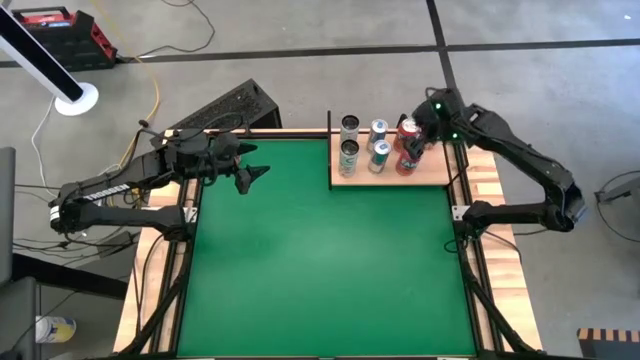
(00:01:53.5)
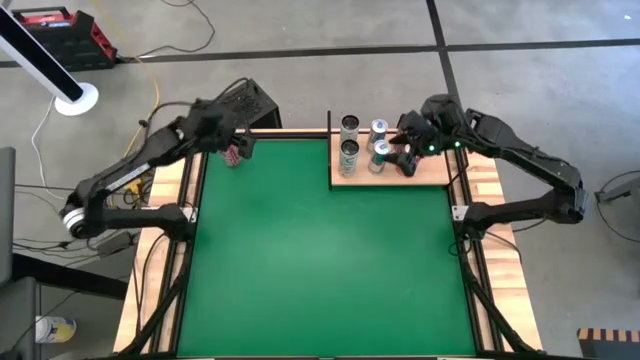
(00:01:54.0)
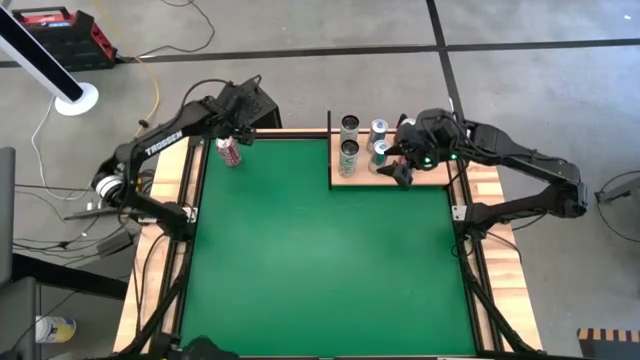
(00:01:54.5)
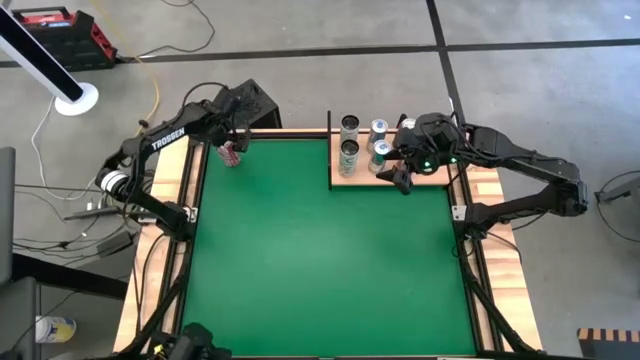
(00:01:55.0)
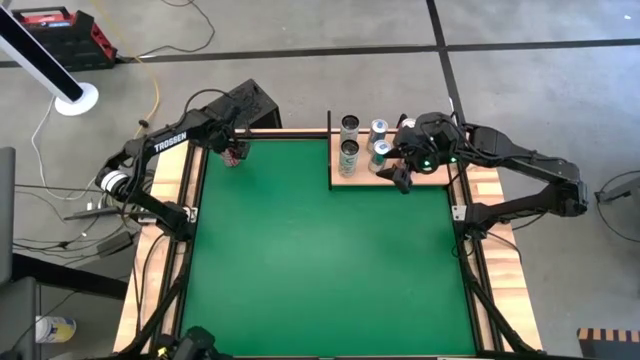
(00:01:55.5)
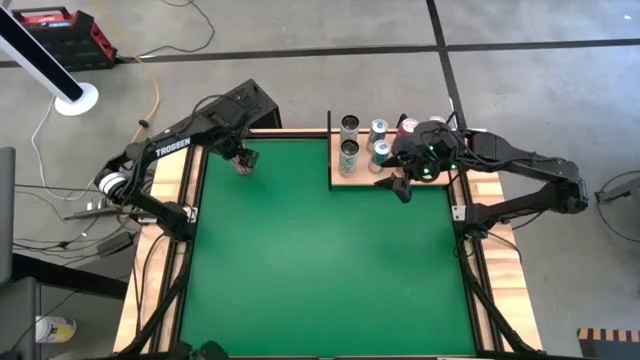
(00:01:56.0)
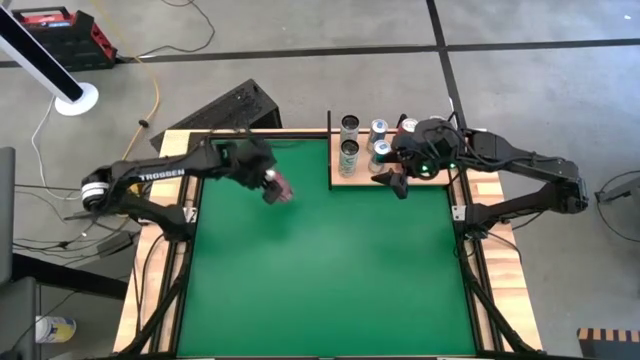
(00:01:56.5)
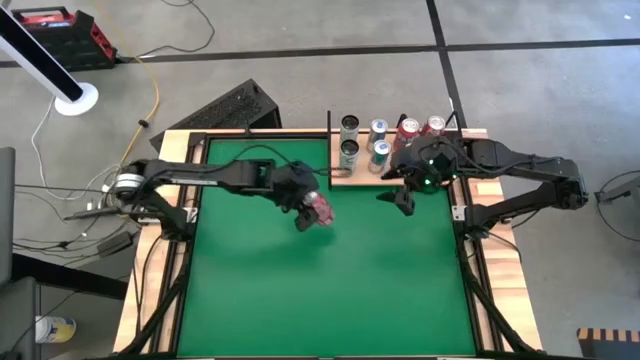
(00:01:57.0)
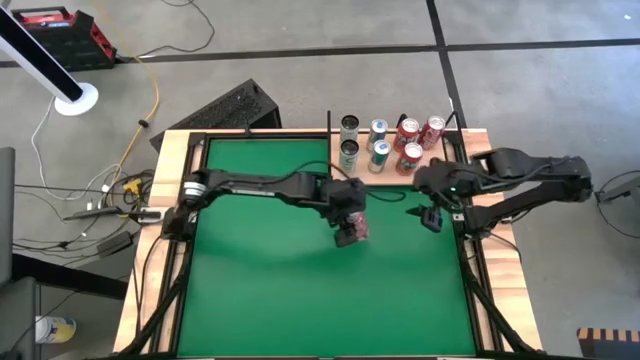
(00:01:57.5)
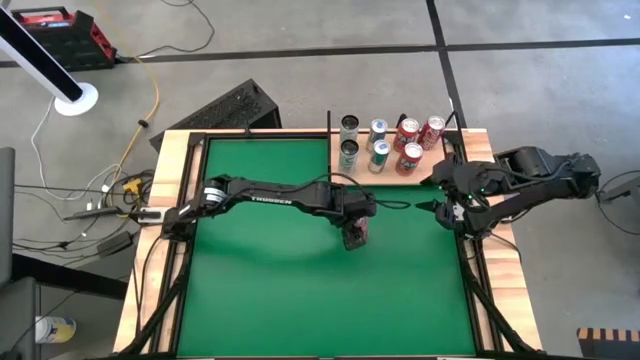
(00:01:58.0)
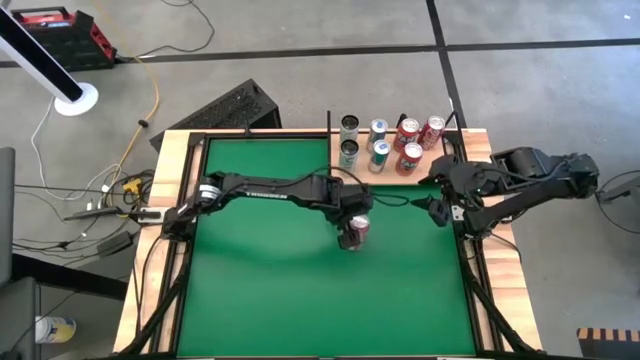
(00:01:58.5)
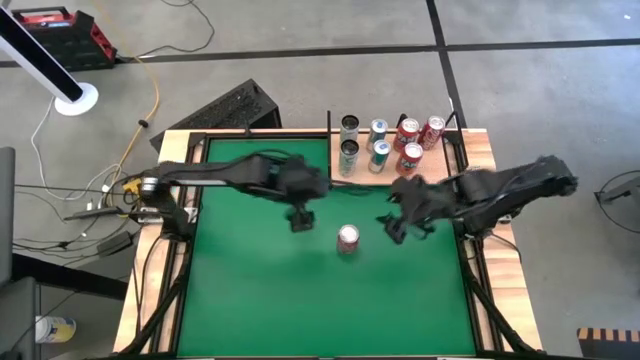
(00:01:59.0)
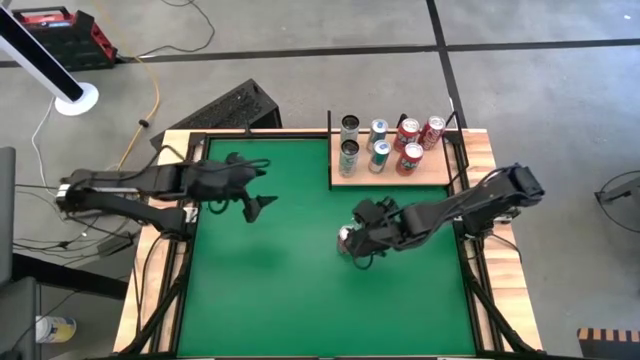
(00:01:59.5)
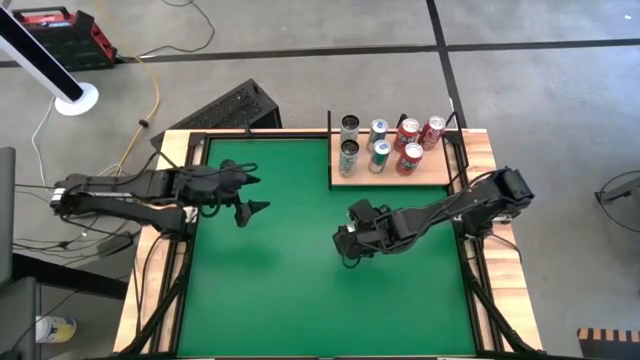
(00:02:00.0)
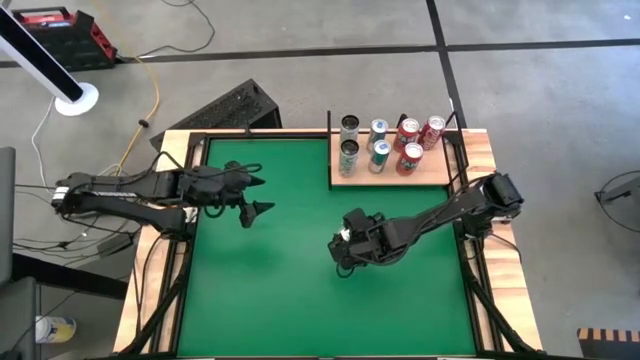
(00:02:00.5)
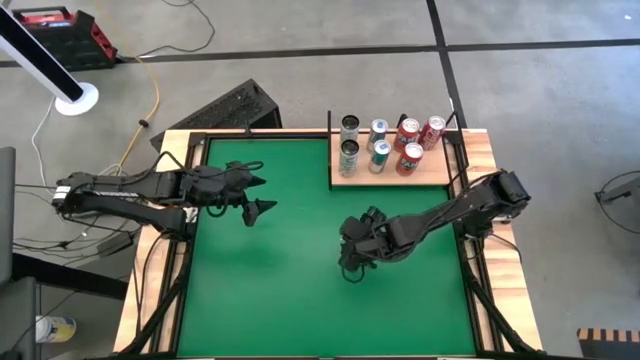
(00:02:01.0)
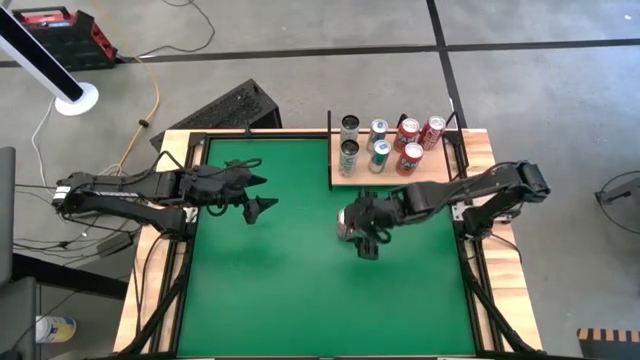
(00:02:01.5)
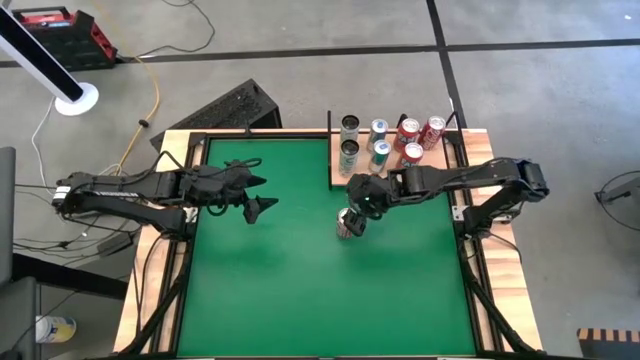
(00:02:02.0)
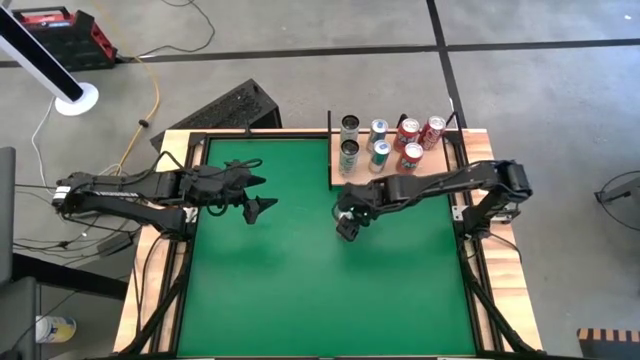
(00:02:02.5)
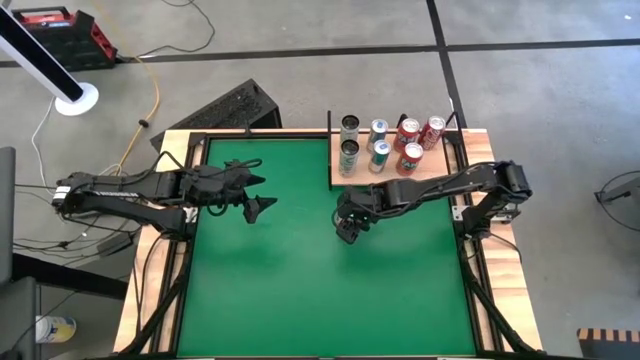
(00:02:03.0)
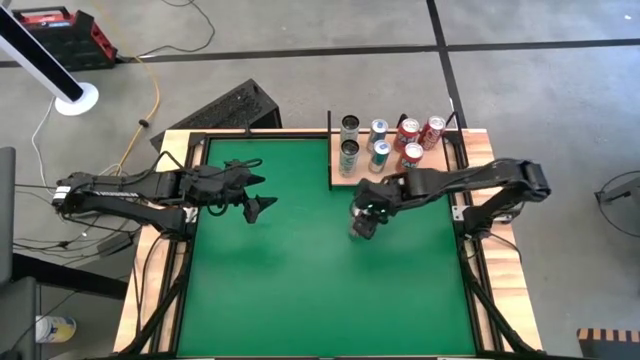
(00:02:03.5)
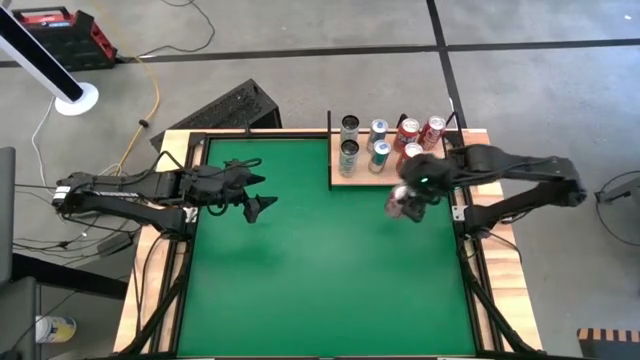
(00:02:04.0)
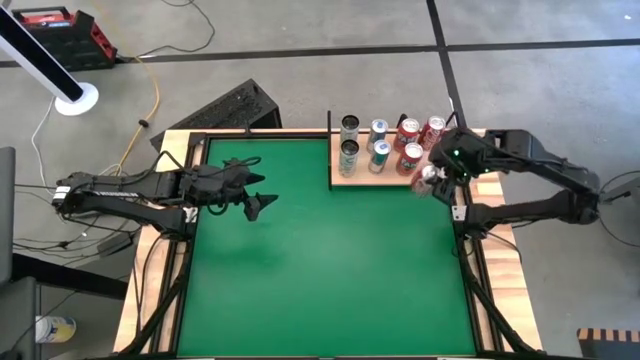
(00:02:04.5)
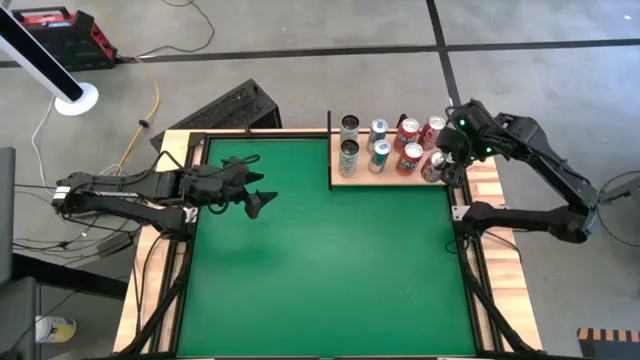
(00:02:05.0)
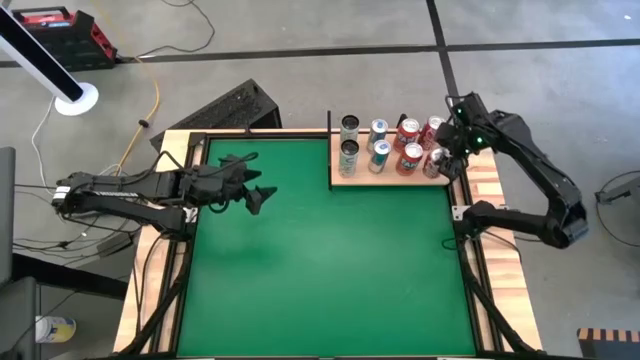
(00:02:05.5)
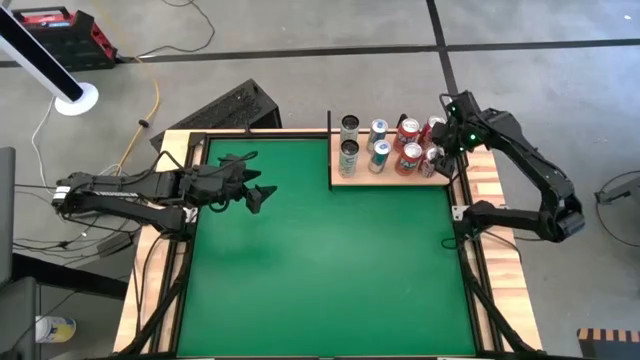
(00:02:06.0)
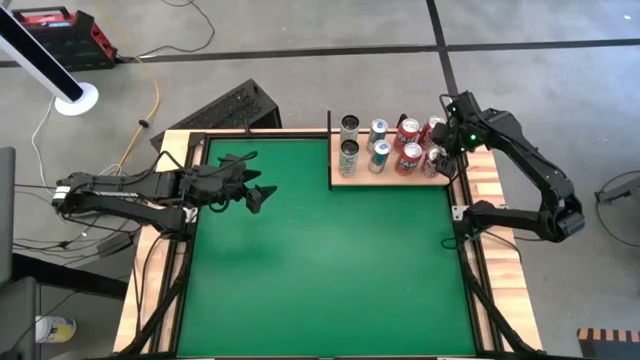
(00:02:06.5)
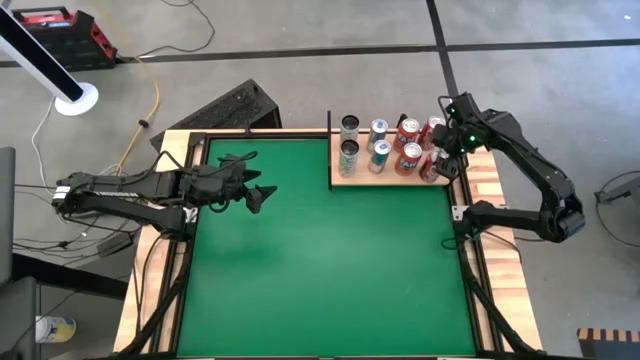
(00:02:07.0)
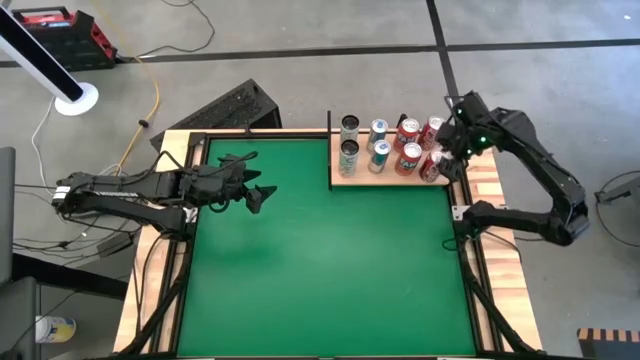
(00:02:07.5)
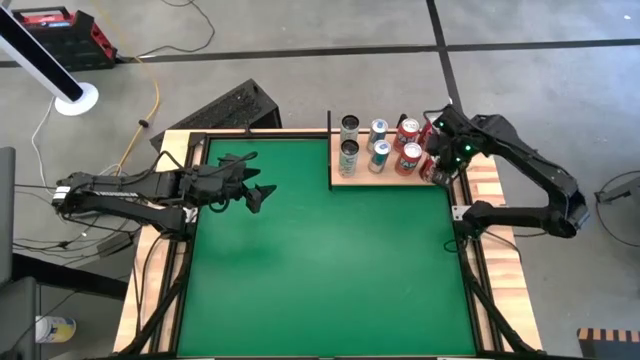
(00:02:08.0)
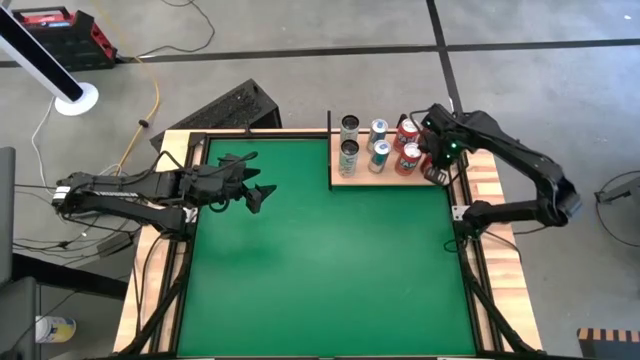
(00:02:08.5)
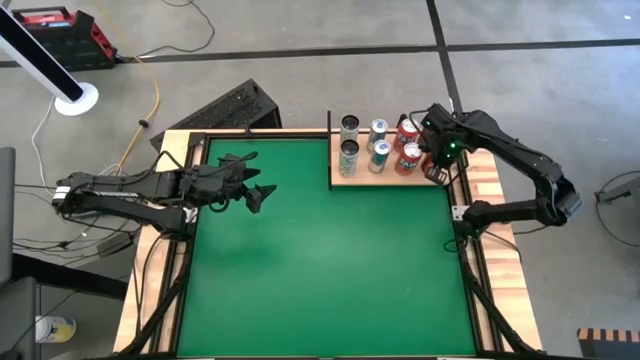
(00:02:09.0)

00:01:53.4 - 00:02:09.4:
Task: Place canned beverage on shelf
Put the red soda can on the shelf aligned with the other soda can

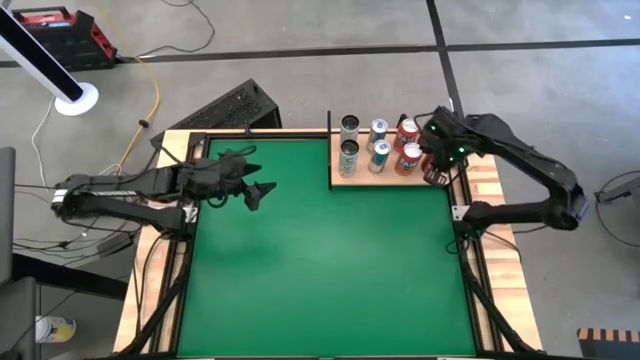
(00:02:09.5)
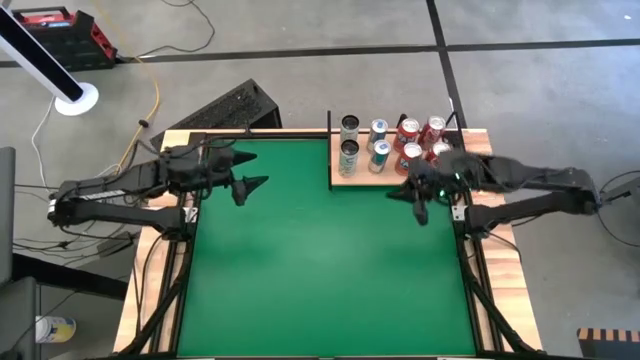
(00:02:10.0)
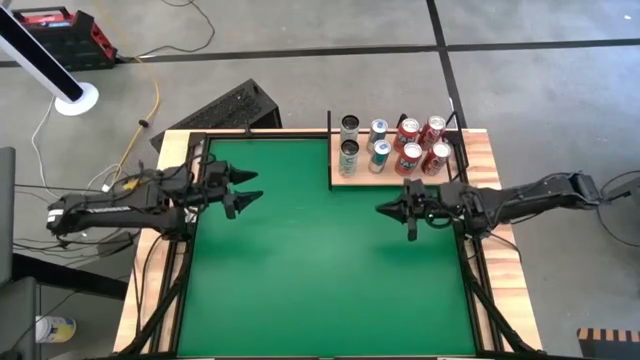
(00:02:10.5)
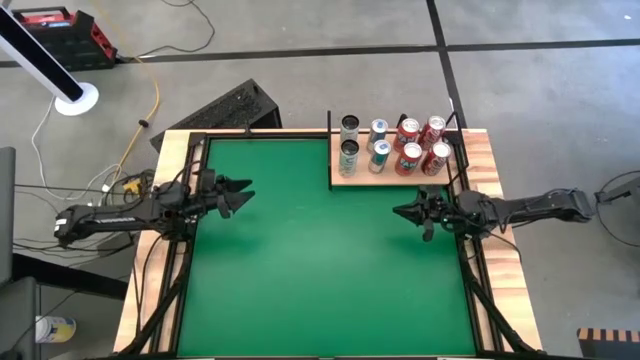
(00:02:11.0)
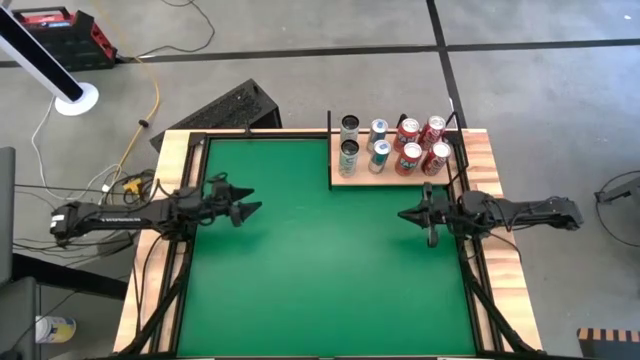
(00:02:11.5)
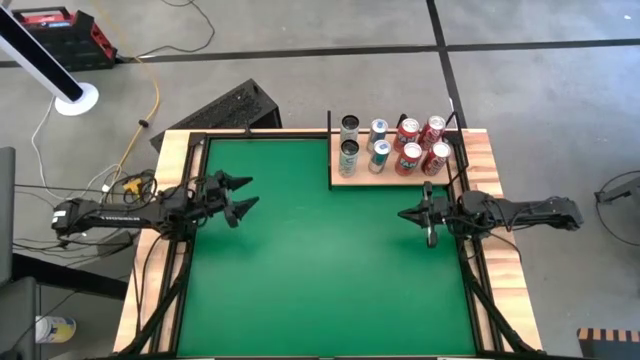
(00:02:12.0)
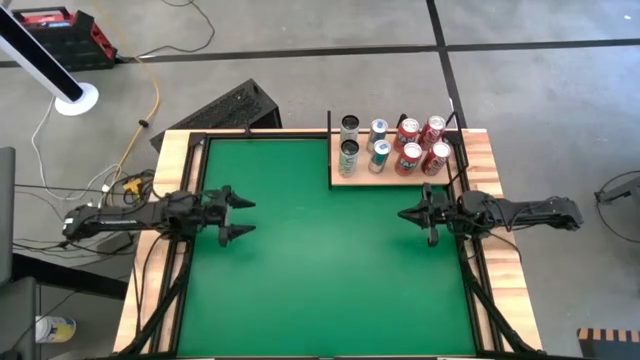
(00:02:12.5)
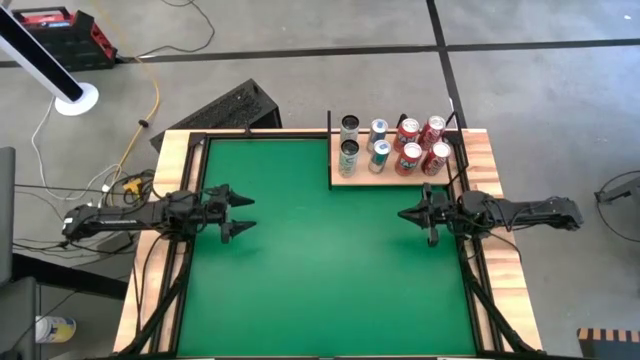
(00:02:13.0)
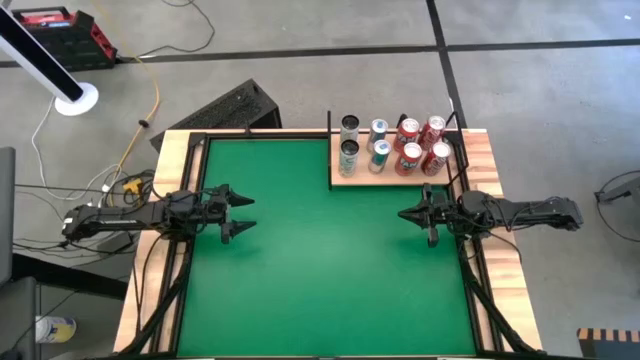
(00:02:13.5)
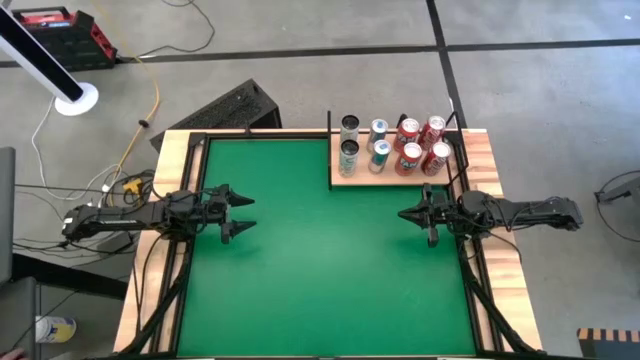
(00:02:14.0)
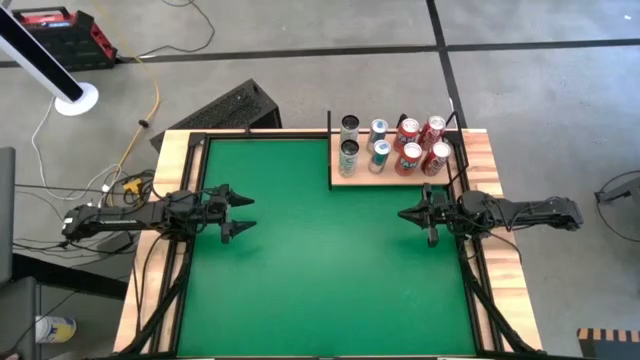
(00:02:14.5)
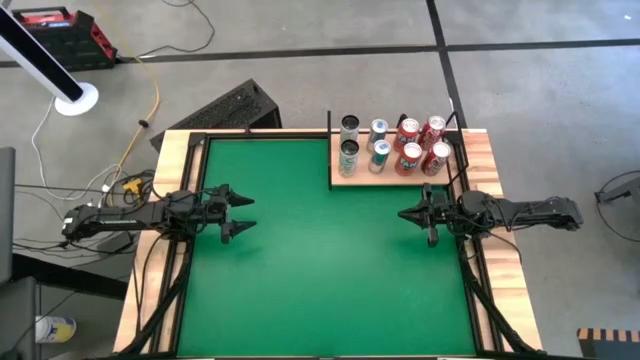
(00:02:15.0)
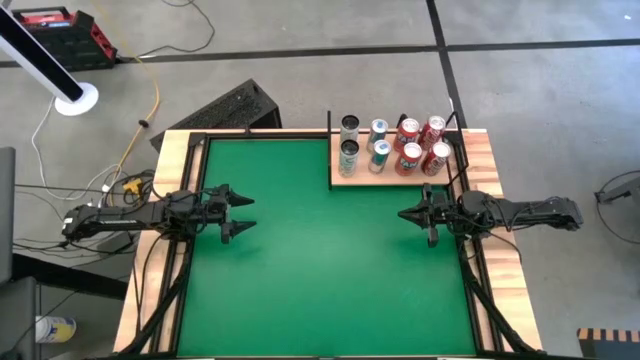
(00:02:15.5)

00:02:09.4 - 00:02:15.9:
Return to Home position
